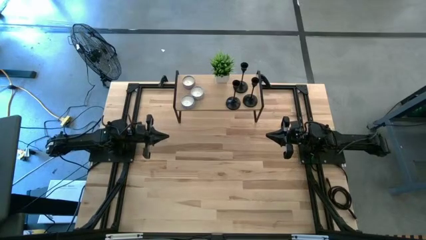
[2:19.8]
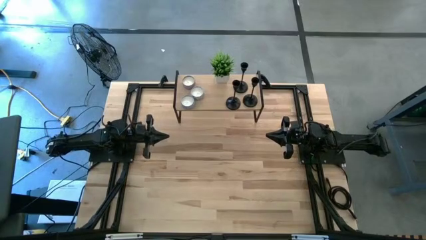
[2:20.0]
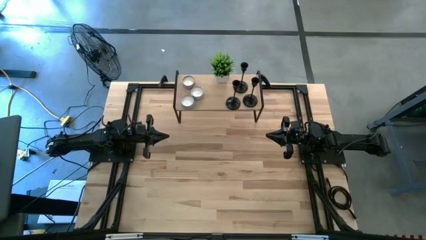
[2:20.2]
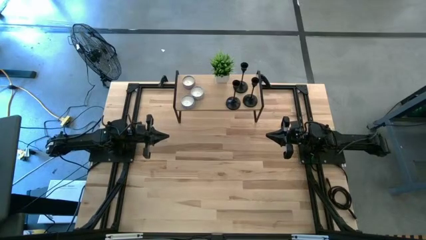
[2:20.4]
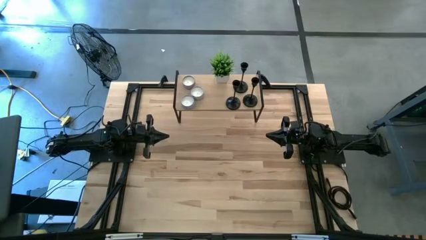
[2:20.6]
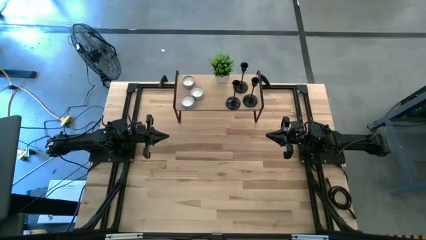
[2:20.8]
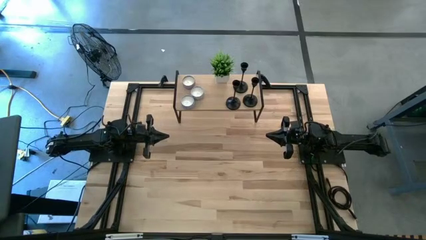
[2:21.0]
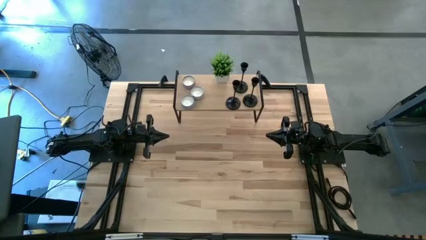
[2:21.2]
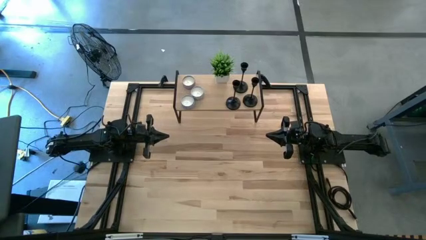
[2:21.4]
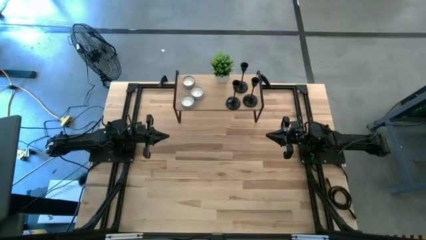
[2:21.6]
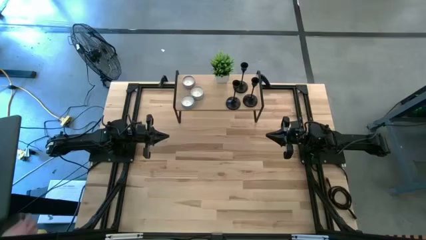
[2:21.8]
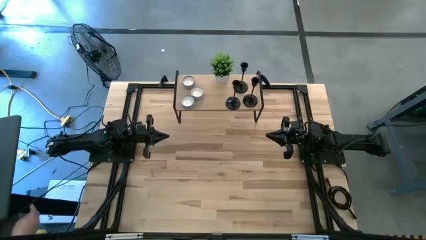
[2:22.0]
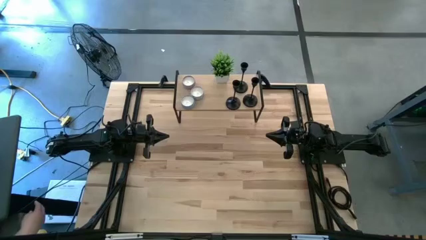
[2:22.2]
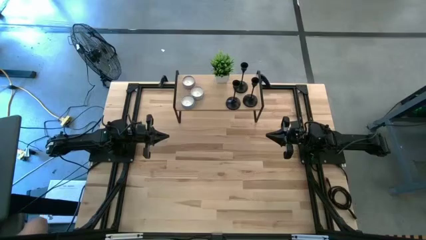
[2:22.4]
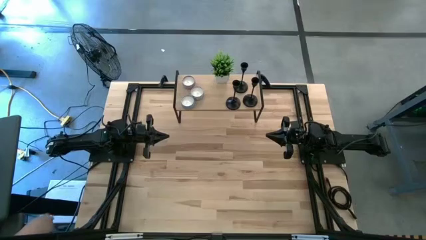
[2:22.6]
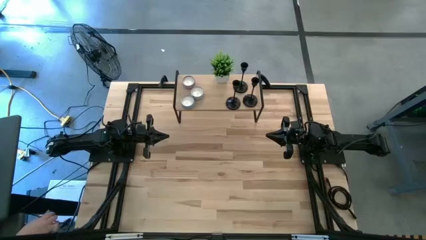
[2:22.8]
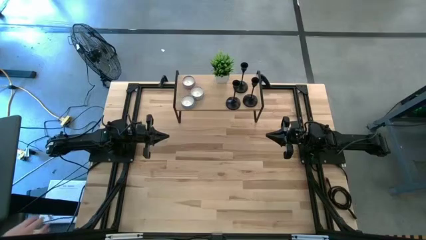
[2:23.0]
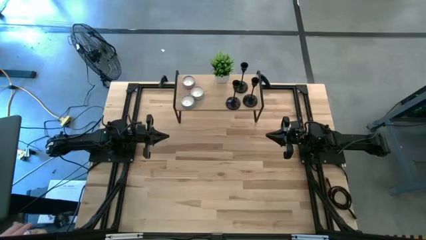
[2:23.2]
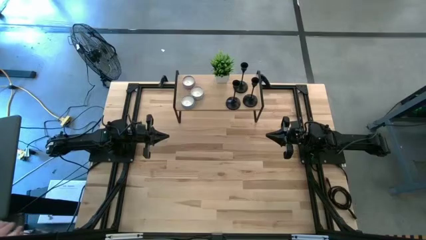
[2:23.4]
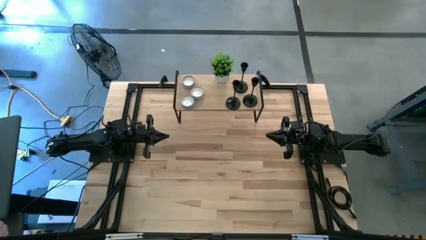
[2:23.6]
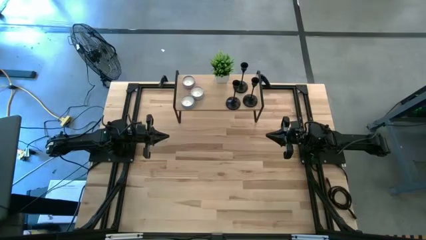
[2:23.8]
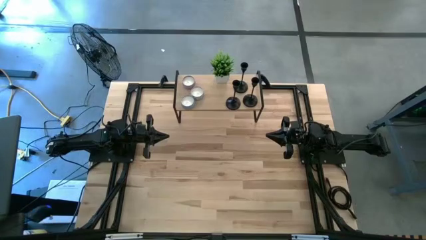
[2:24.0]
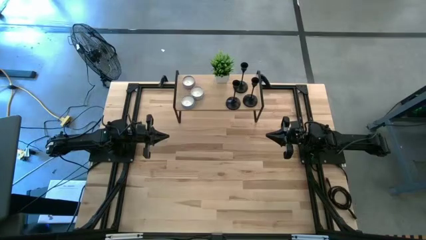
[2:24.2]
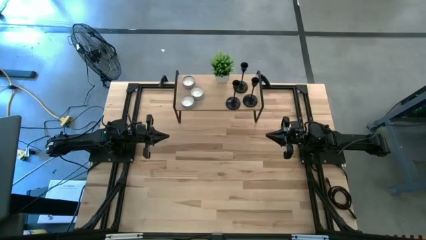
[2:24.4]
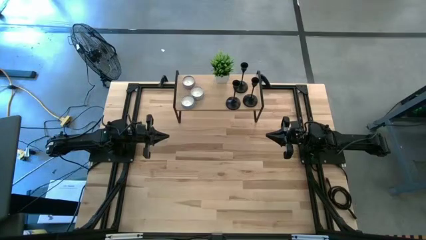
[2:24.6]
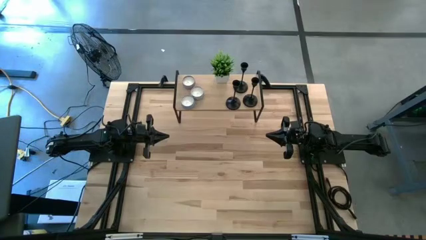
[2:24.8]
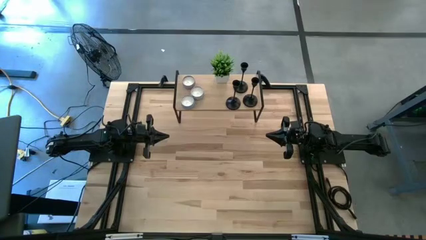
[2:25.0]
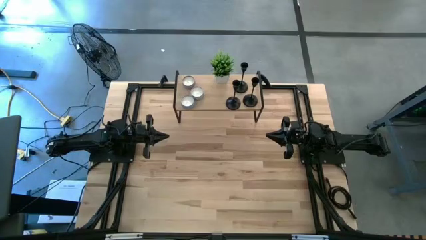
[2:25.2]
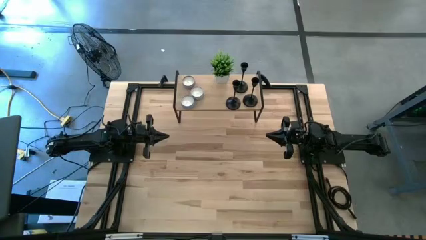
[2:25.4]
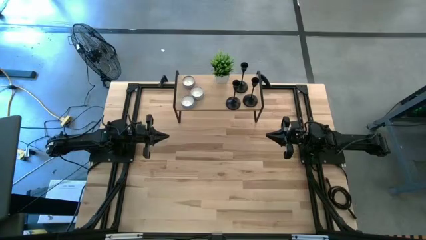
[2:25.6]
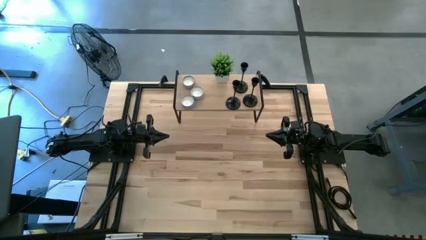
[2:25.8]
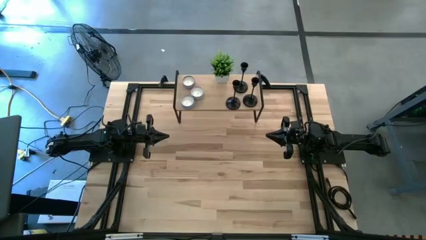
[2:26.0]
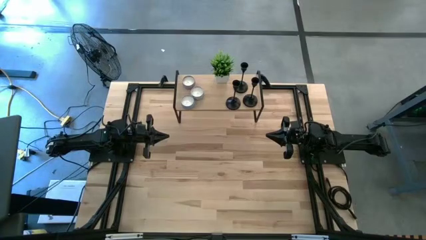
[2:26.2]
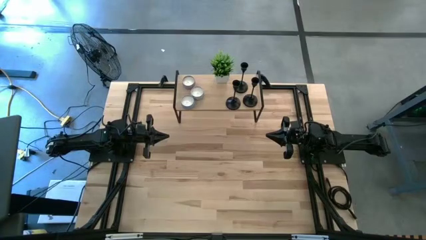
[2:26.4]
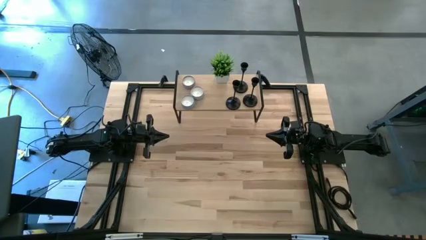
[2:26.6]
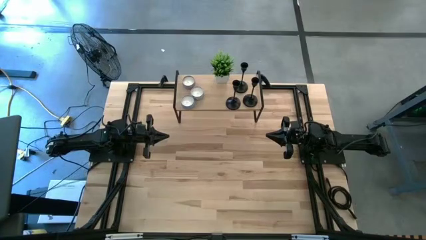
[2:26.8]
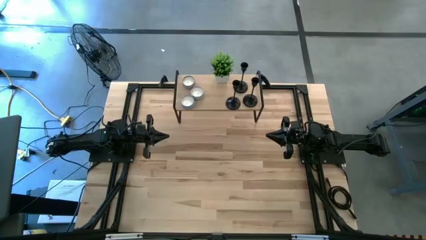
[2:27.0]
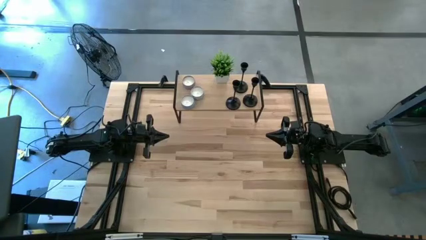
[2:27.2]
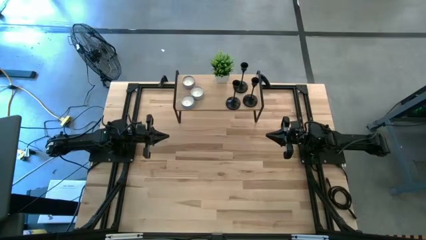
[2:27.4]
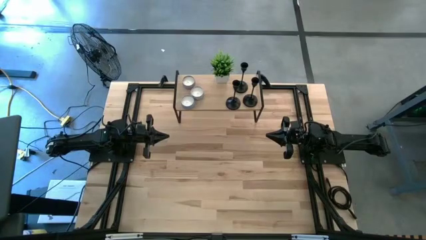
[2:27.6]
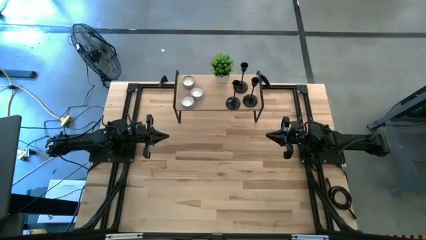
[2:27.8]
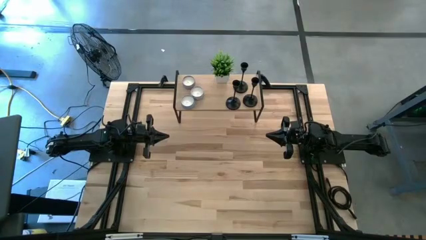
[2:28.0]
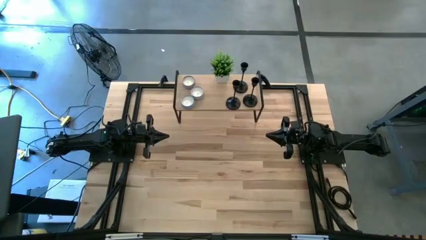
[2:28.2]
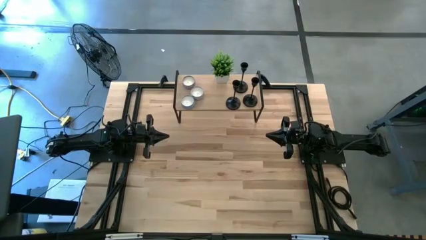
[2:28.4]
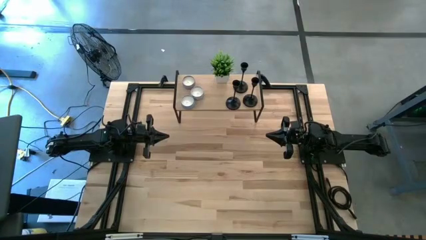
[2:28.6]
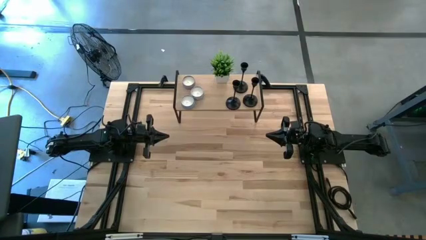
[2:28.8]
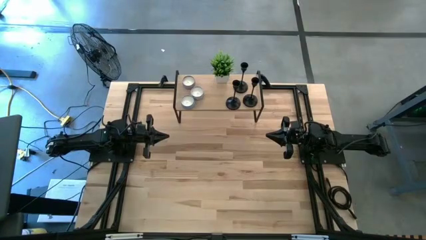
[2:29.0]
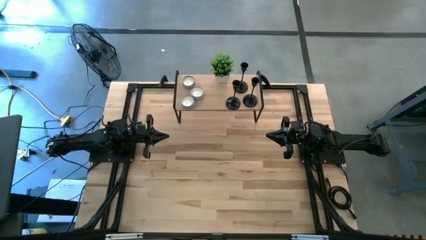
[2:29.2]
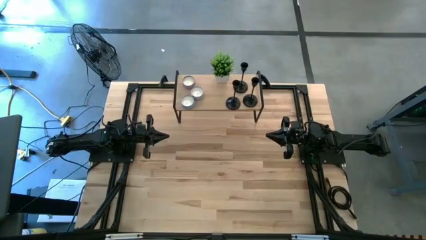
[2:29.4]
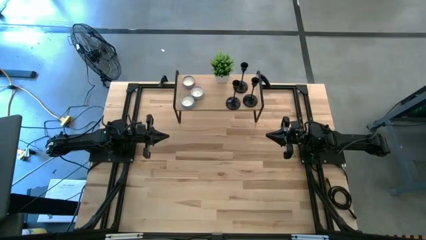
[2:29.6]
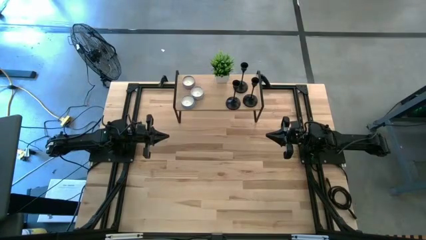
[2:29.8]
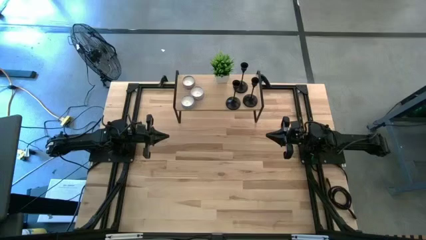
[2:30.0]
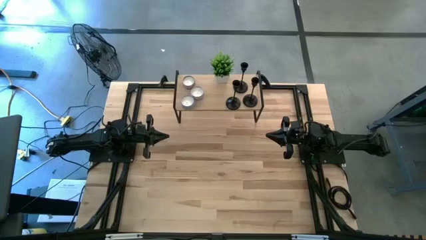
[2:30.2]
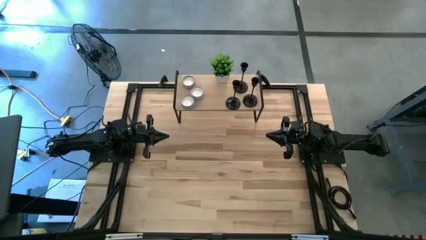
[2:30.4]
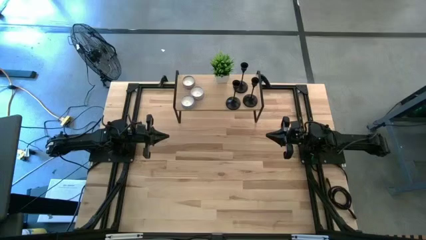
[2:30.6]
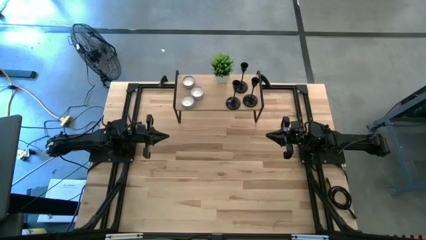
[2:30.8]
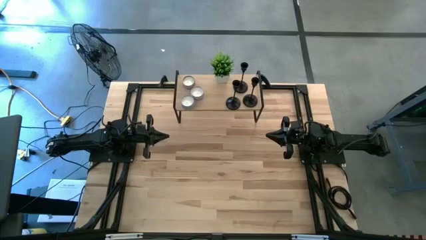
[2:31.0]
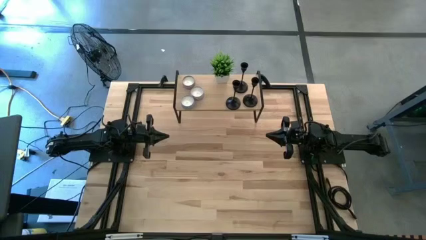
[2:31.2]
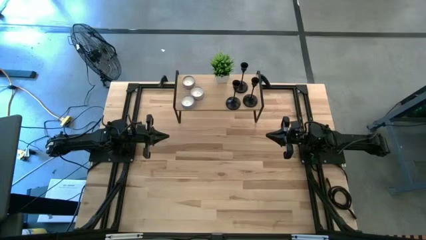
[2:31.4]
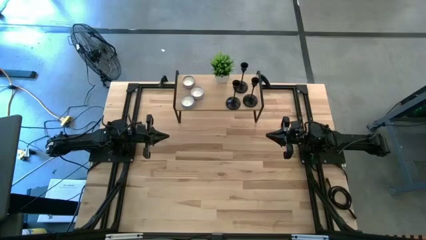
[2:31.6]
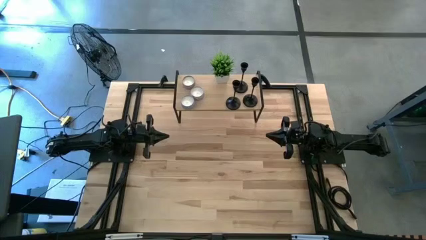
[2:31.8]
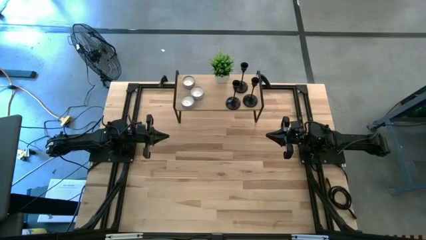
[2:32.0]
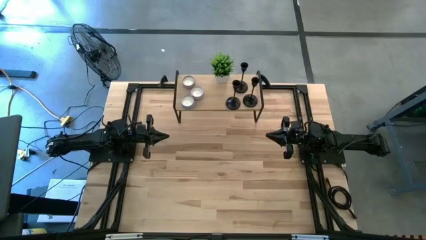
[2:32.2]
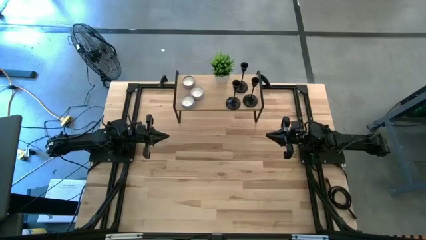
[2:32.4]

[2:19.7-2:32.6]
Task: Pick & Place candle stick holders
Return to Home Position
